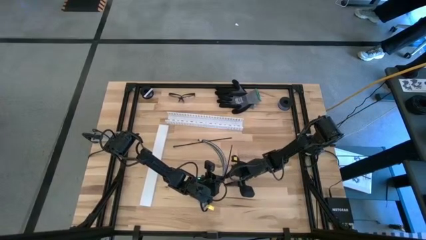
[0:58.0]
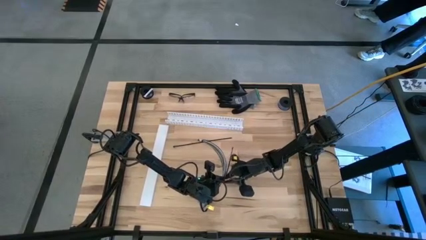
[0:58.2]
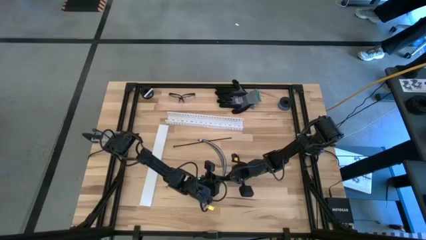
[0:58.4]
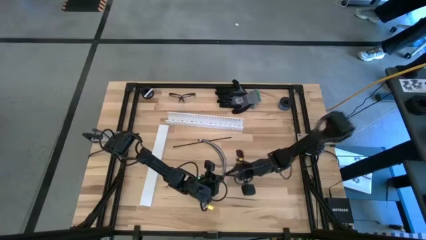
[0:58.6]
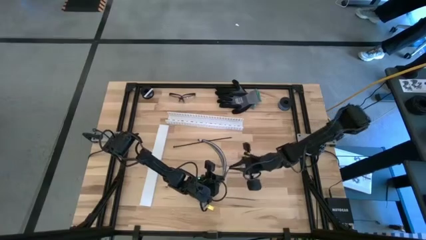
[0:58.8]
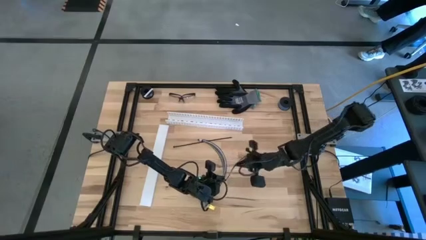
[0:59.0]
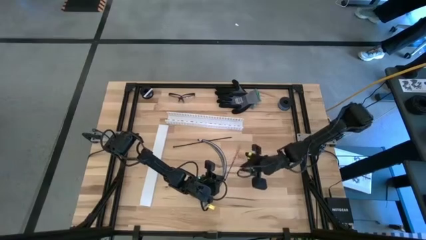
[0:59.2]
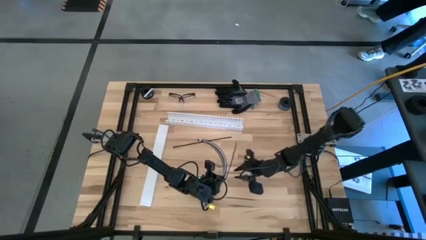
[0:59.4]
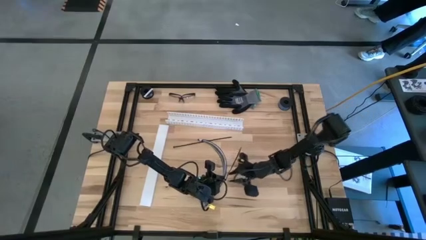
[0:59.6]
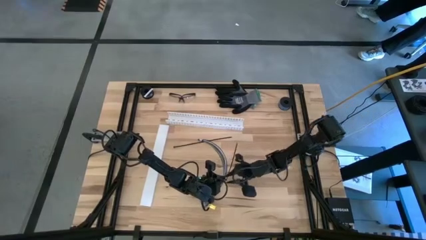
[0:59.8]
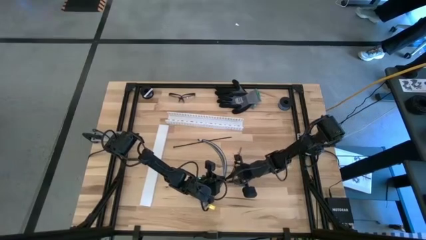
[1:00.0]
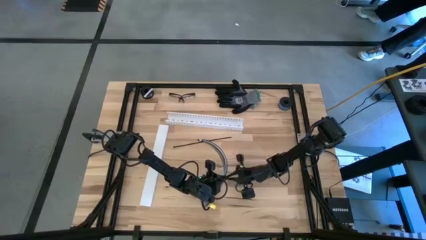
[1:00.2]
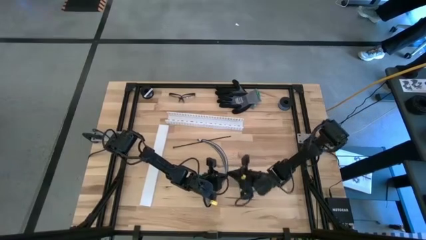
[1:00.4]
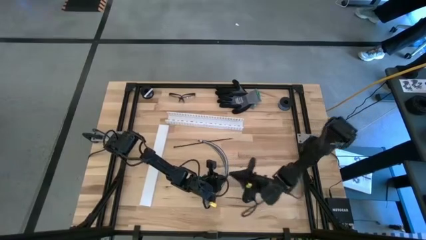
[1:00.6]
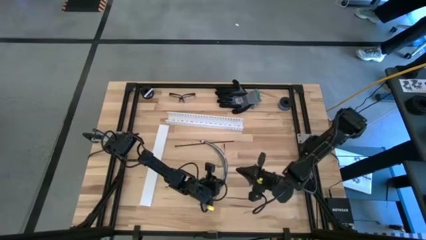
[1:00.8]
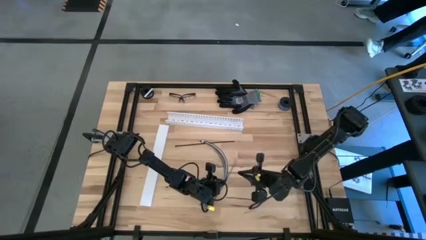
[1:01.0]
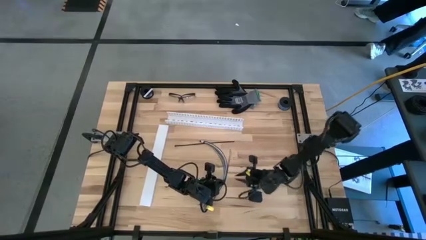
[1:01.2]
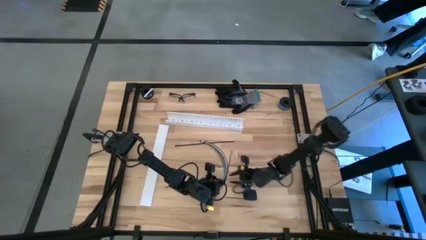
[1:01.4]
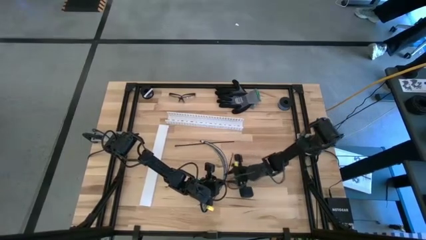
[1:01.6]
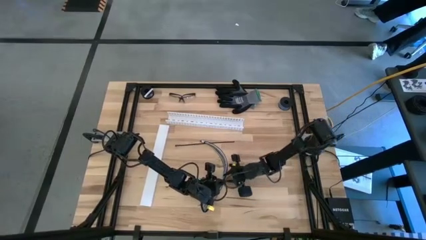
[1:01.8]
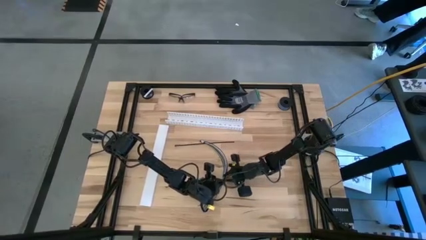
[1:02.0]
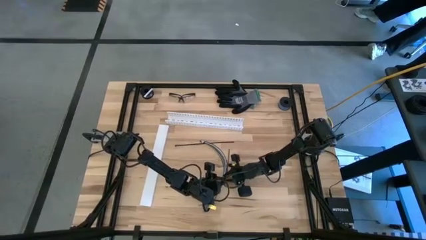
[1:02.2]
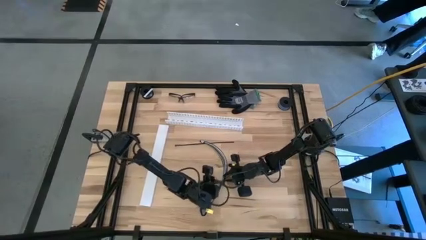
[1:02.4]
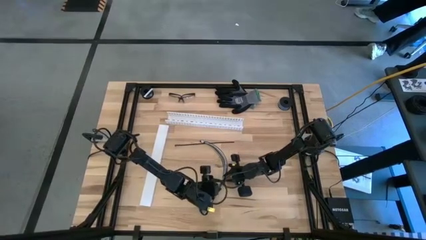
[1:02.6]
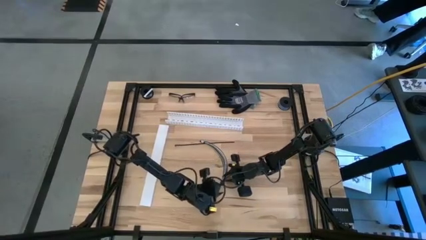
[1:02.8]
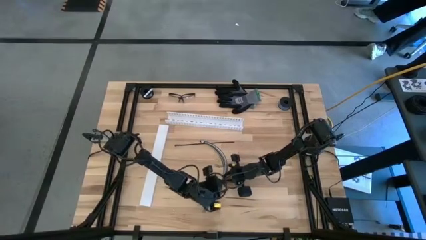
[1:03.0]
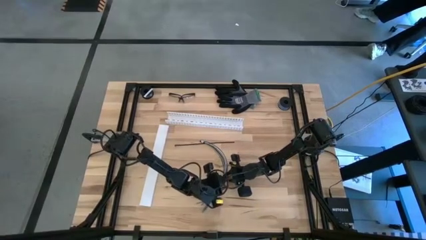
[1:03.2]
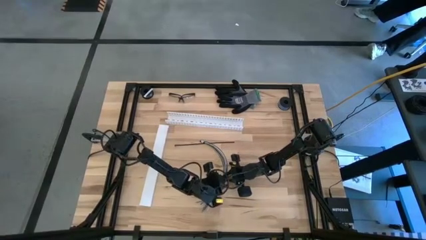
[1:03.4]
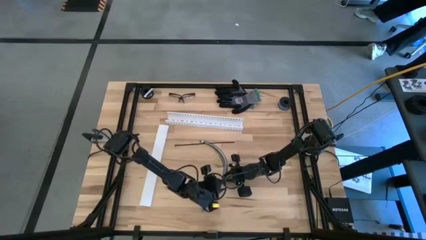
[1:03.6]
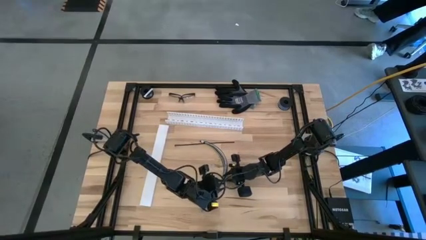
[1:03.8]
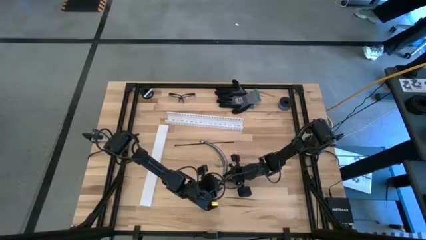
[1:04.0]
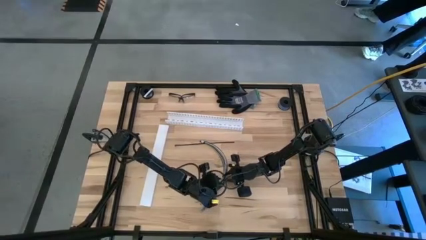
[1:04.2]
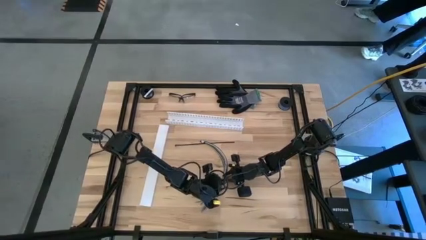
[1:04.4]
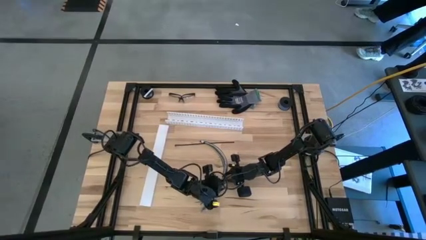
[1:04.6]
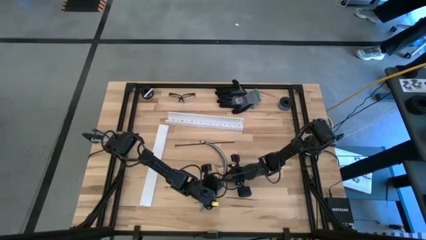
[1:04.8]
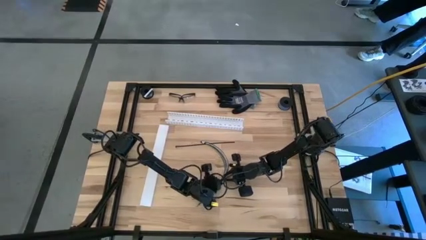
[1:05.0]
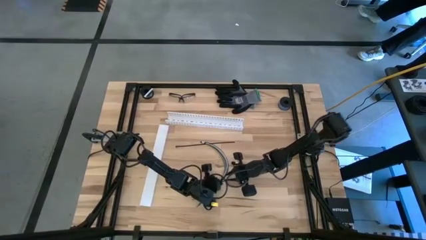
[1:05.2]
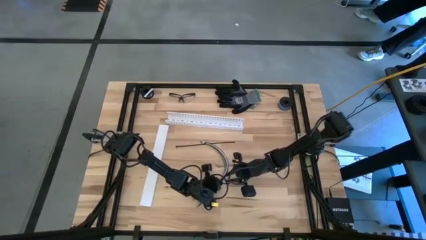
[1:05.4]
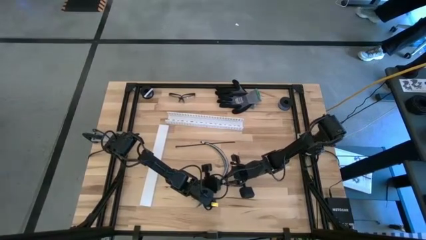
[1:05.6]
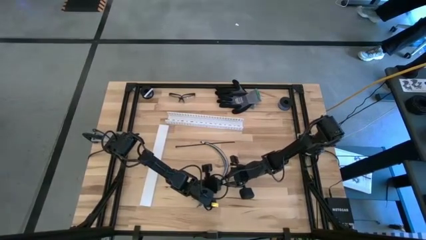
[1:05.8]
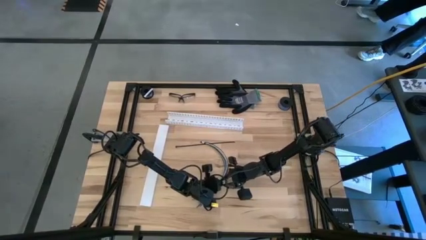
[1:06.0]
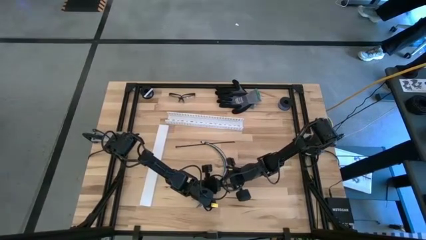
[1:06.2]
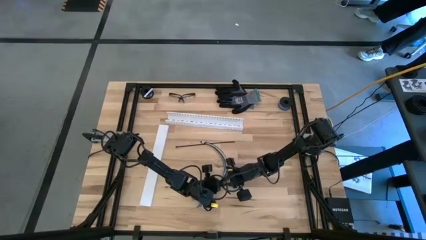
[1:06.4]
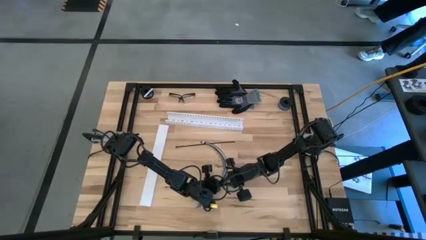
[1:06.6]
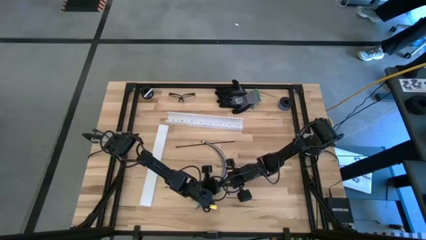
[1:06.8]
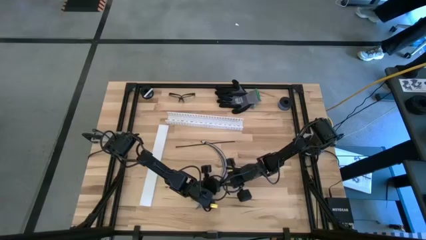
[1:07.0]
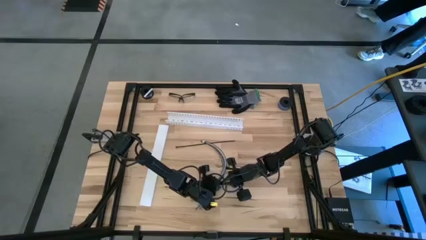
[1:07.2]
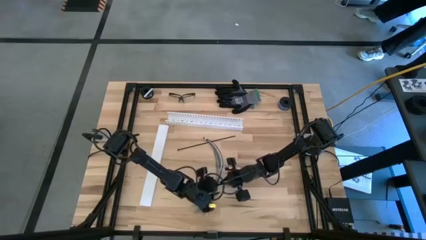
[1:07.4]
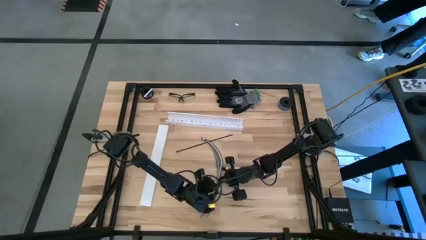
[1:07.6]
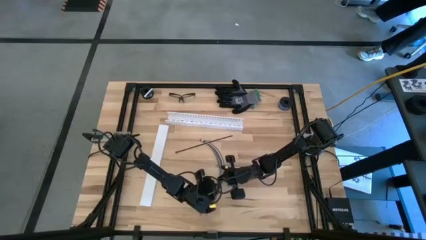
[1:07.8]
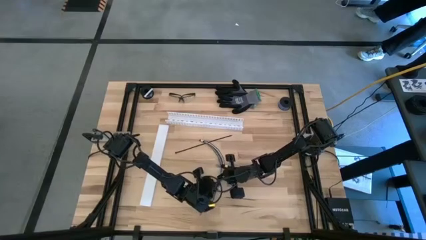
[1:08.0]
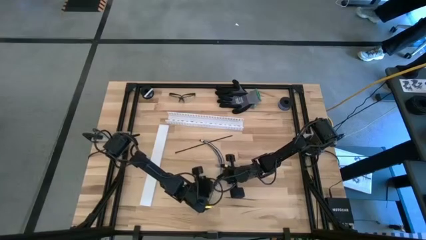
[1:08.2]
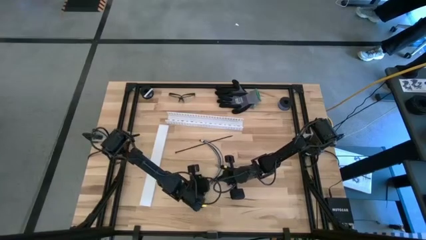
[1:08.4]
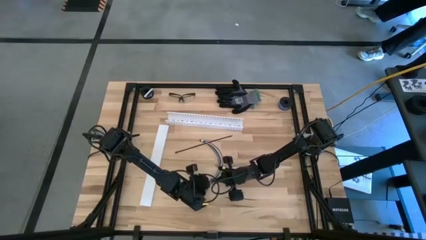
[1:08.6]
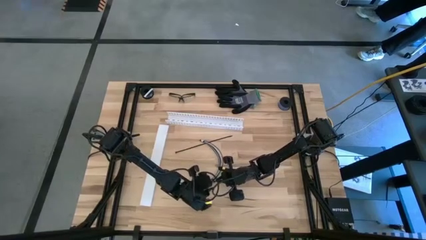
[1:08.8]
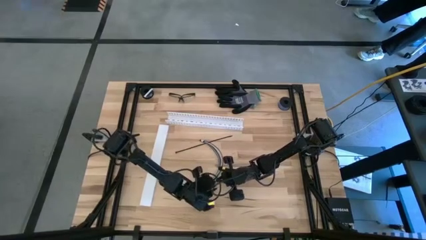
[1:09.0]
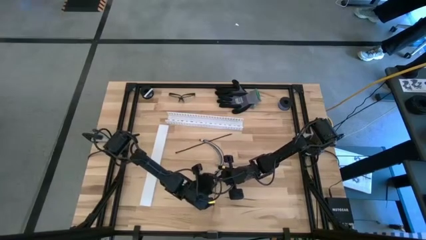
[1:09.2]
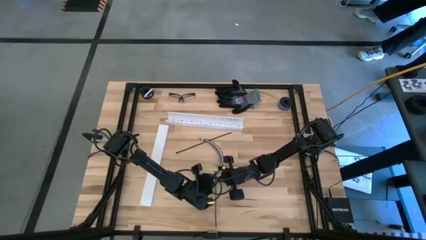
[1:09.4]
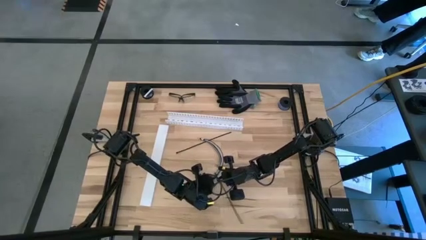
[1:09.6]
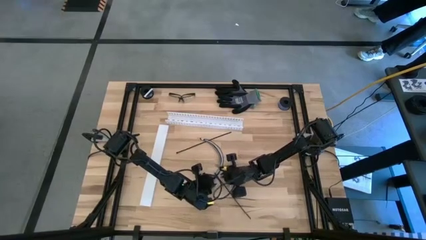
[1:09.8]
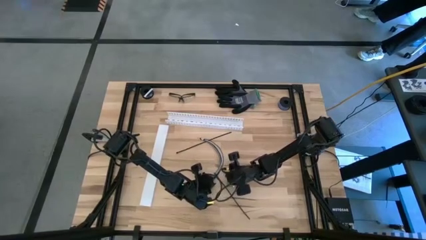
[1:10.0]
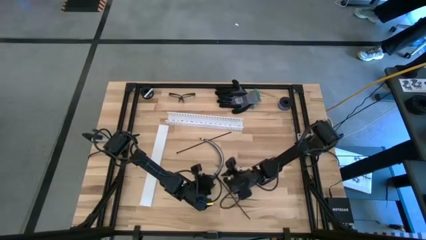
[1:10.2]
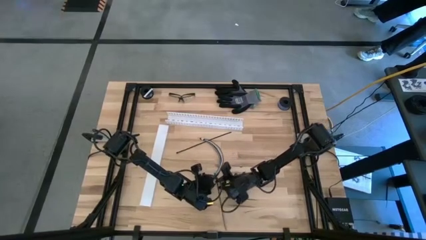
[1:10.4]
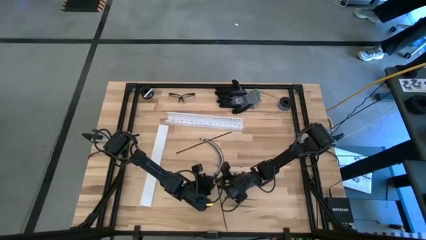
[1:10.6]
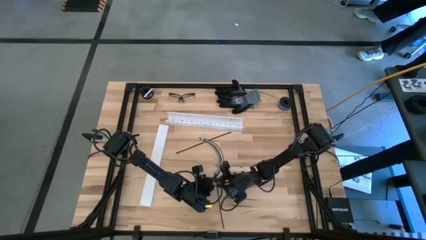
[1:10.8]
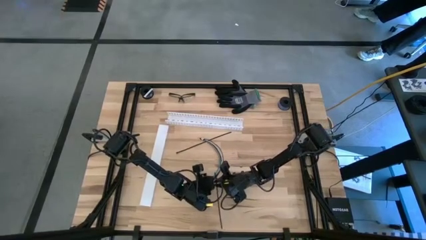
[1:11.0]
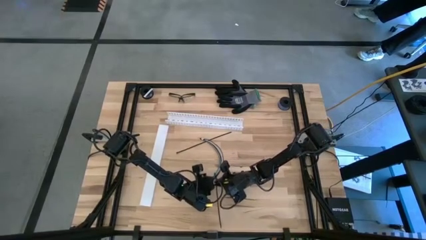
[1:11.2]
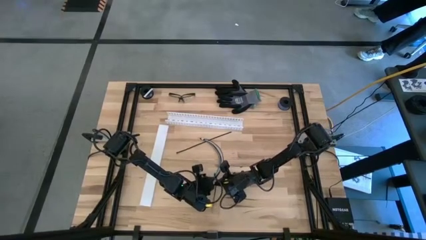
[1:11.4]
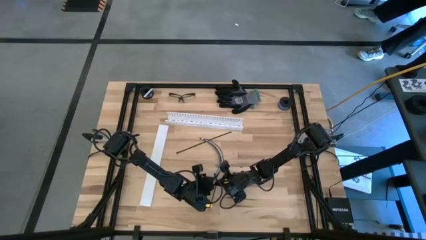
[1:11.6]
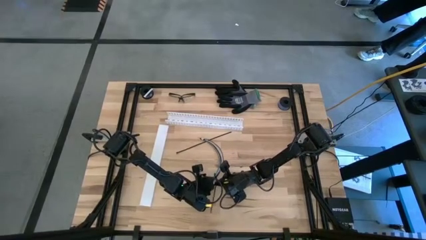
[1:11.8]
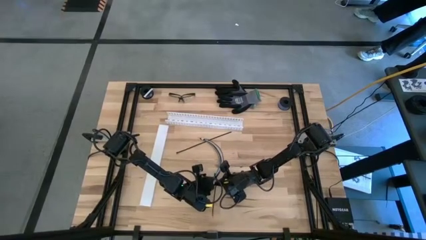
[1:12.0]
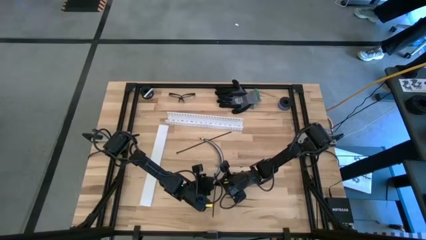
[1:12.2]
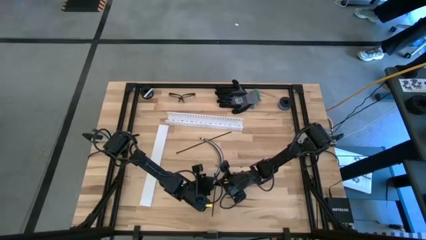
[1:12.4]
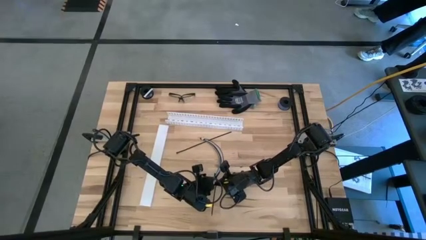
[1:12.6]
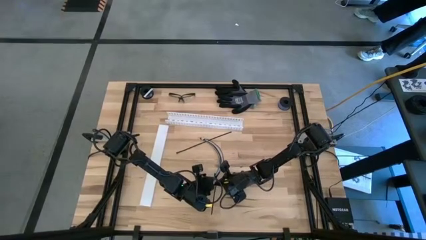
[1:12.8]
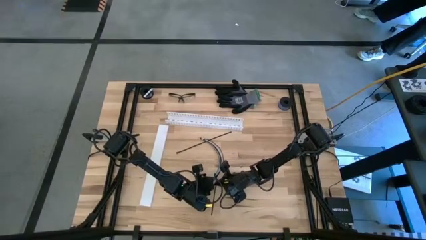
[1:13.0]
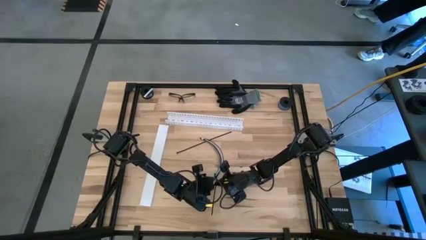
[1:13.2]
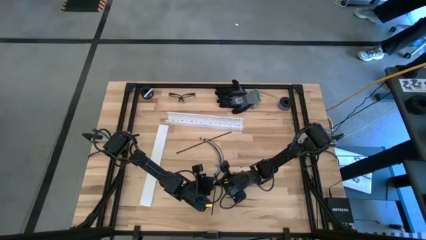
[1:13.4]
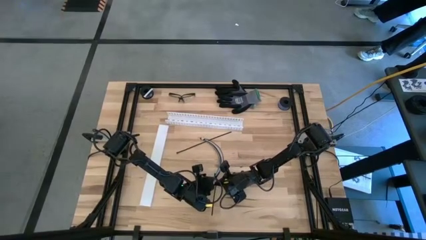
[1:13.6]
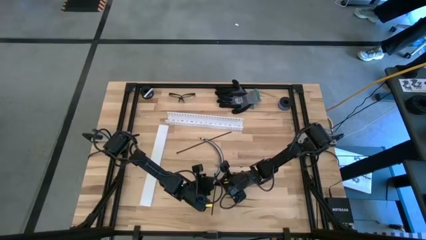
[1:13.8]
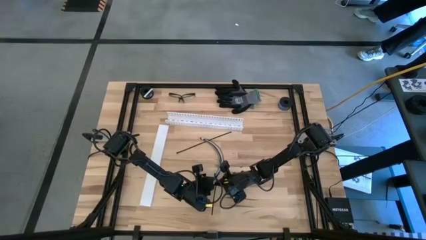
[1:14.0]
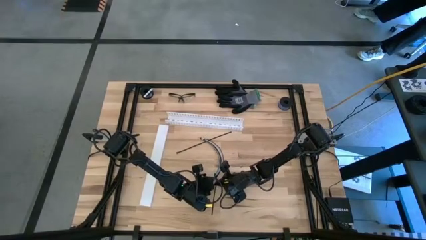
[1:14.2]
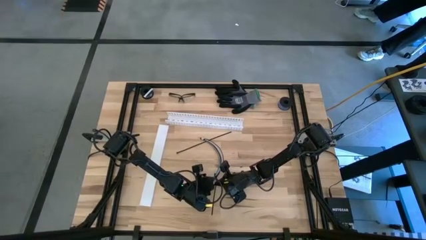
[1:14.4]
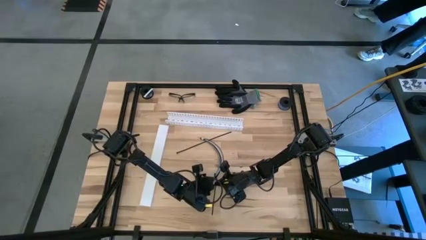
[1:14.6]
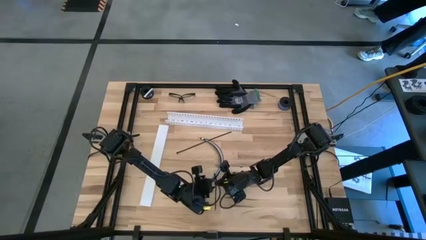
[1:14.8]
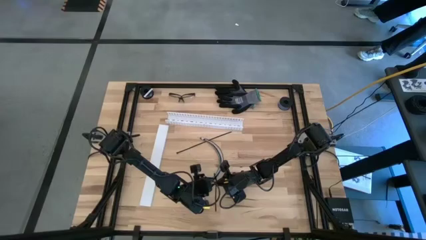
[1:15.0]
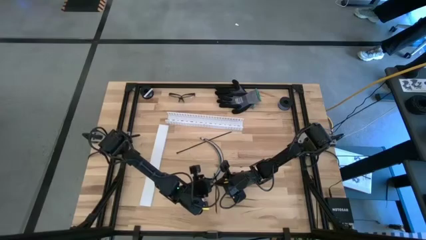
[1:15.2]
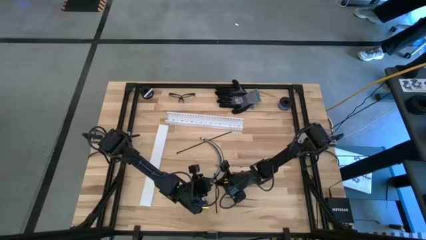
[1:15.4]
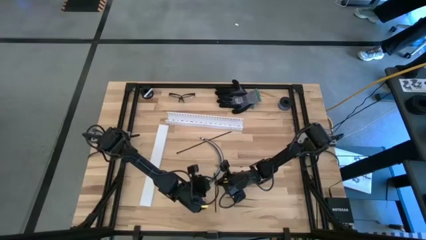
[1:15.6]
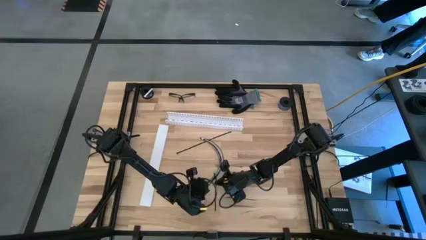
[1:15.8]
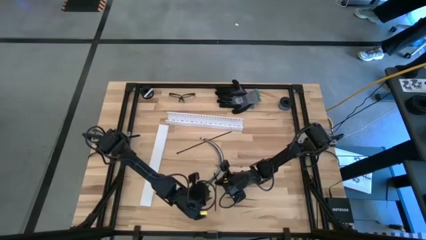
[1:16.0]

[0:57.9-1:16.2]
Task: Ziptie cables
Wrap the black zip tie on the cable
